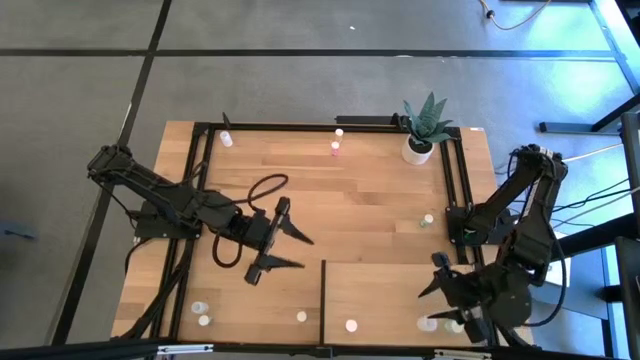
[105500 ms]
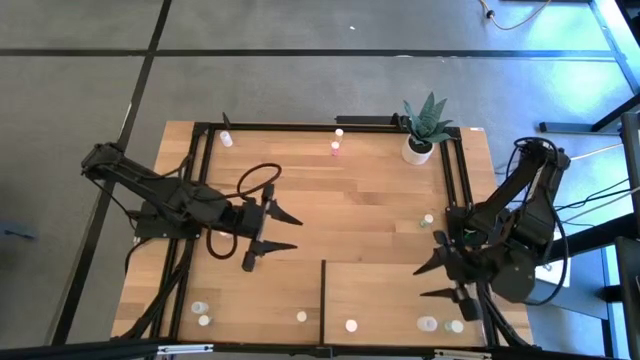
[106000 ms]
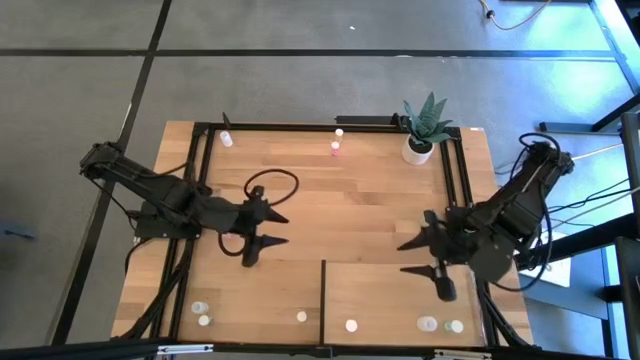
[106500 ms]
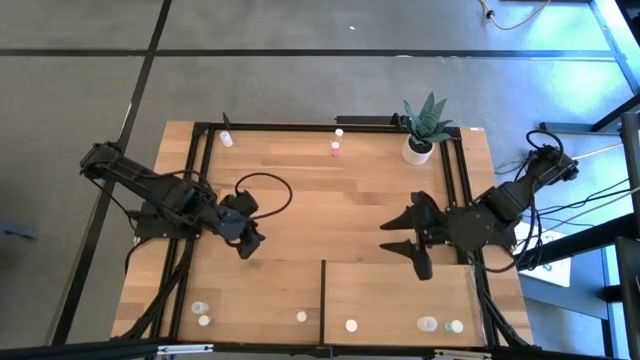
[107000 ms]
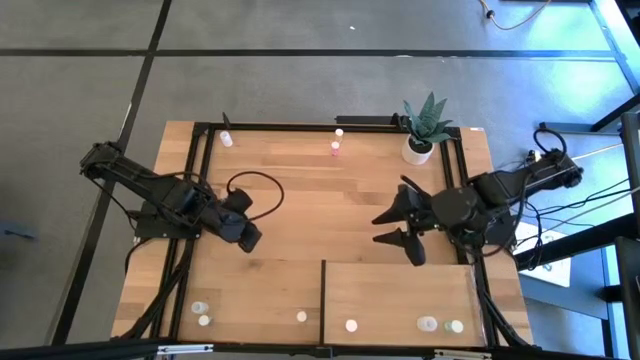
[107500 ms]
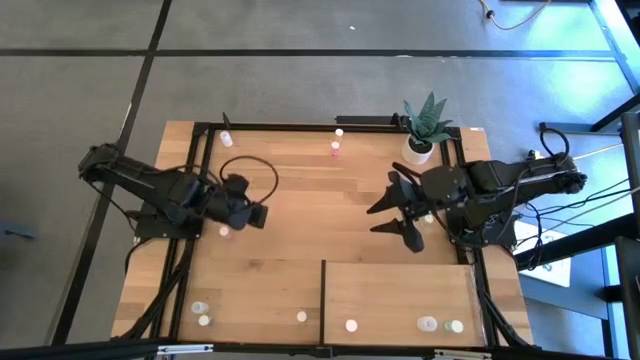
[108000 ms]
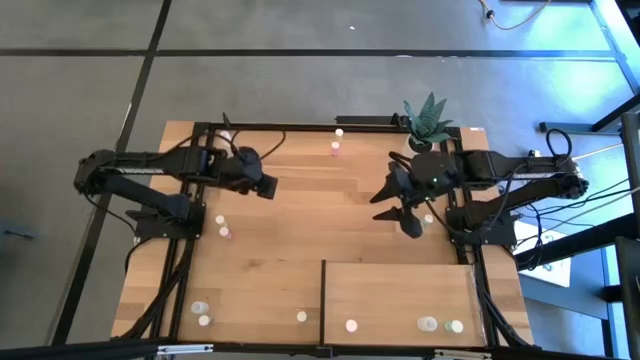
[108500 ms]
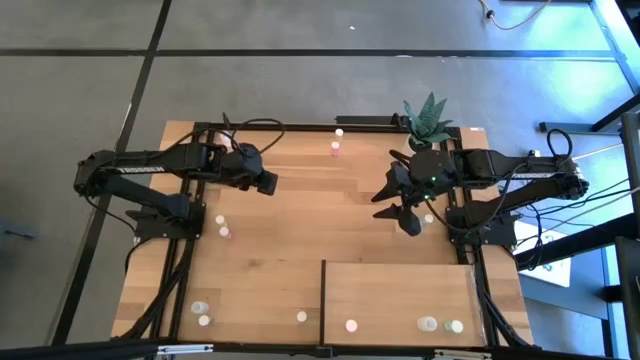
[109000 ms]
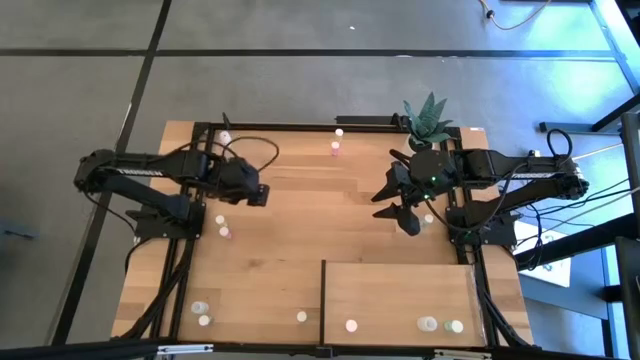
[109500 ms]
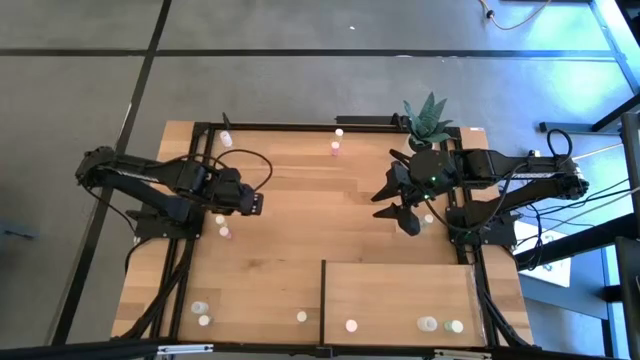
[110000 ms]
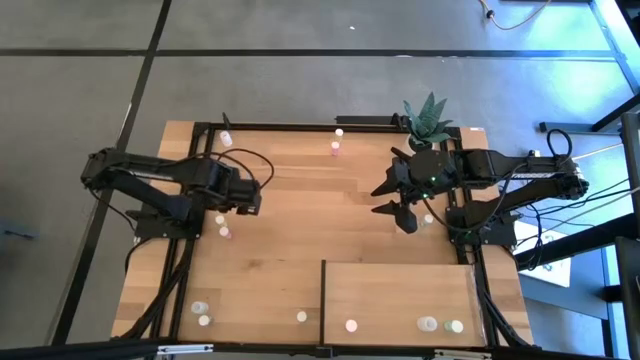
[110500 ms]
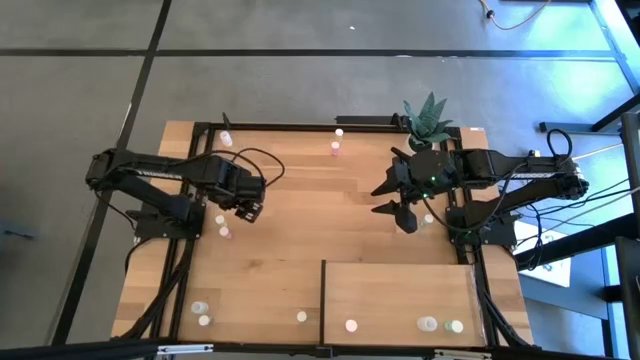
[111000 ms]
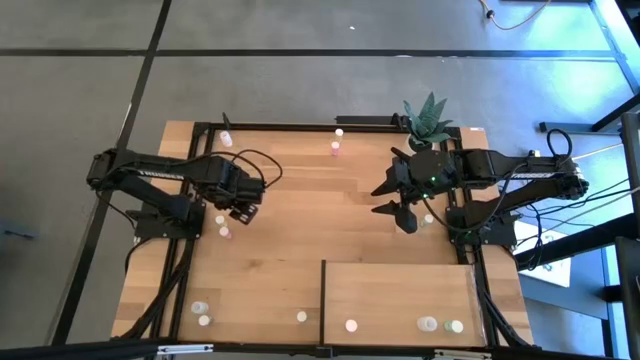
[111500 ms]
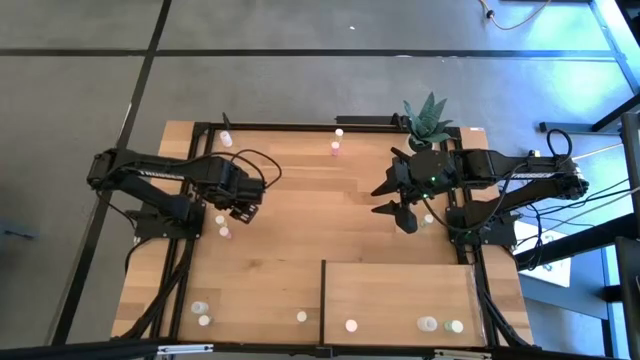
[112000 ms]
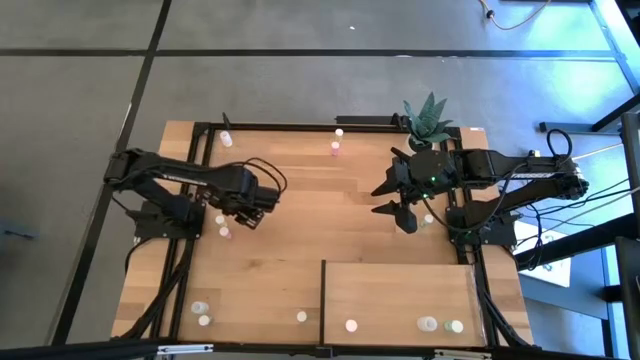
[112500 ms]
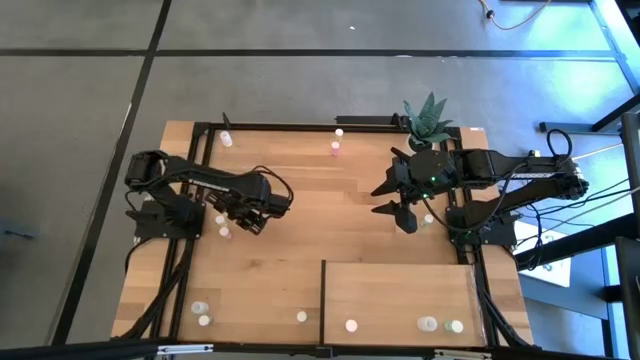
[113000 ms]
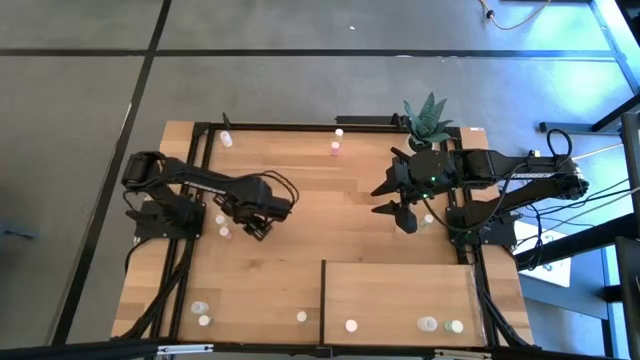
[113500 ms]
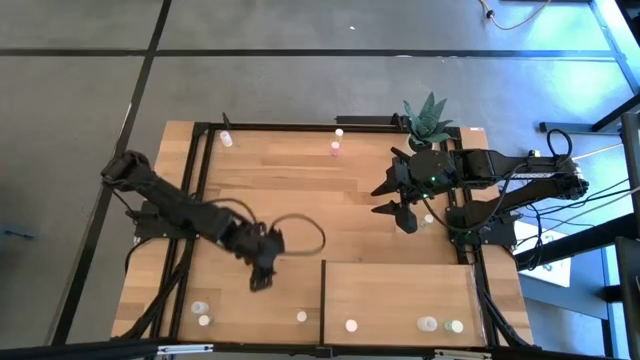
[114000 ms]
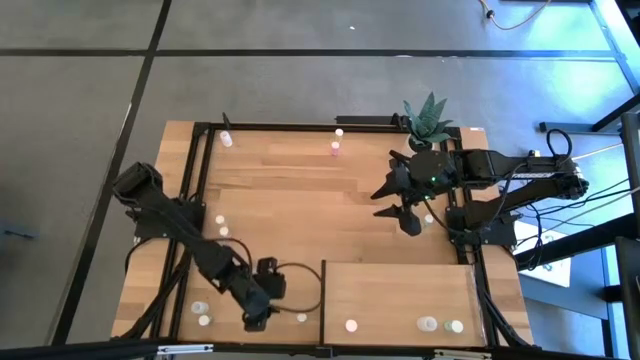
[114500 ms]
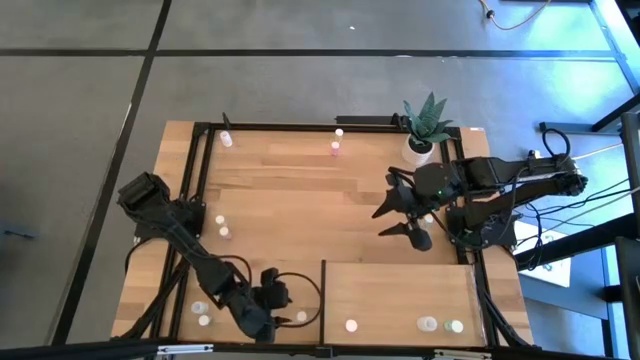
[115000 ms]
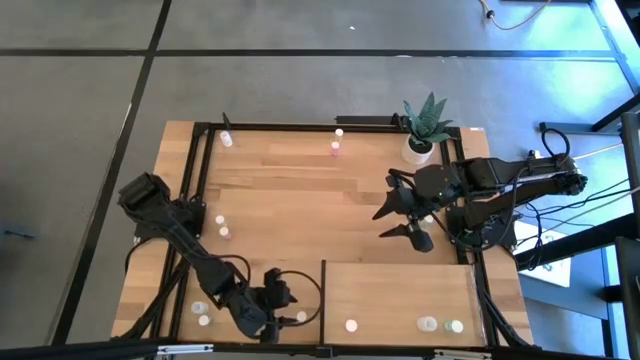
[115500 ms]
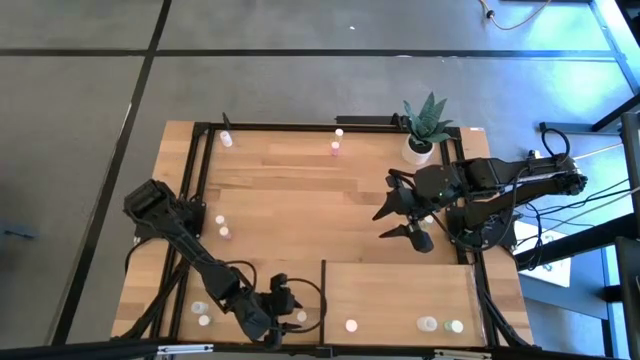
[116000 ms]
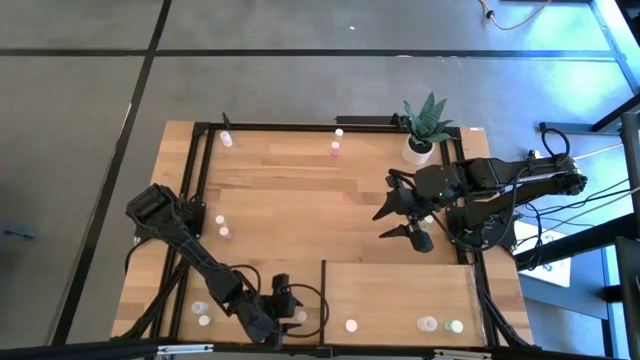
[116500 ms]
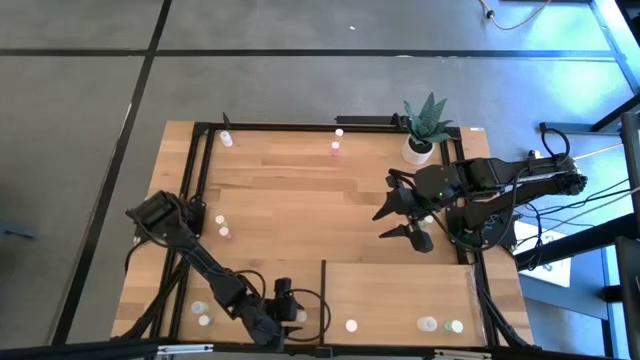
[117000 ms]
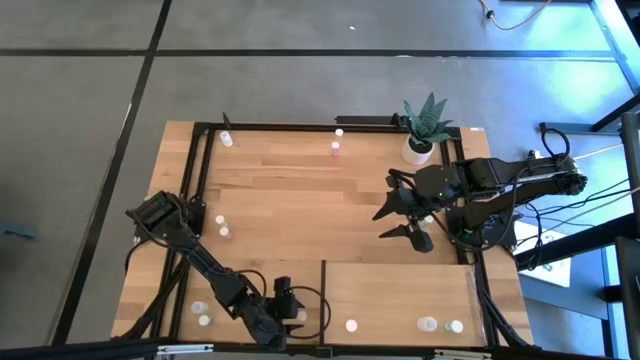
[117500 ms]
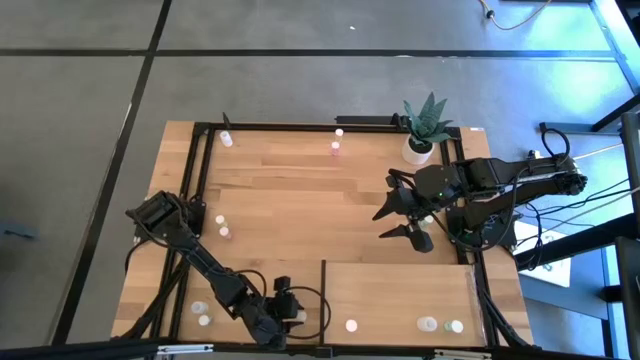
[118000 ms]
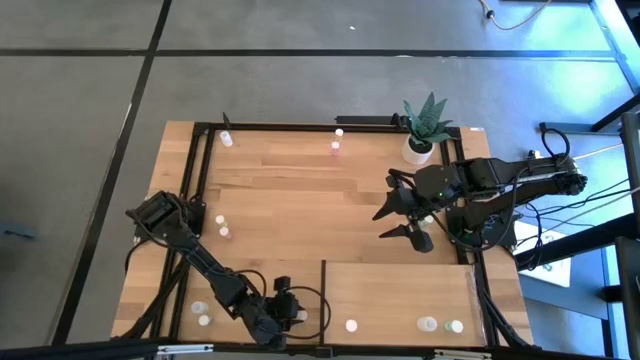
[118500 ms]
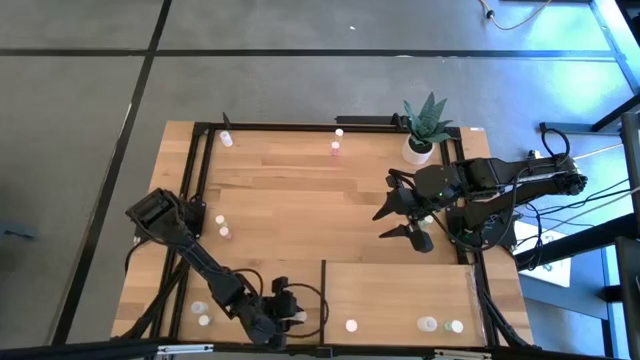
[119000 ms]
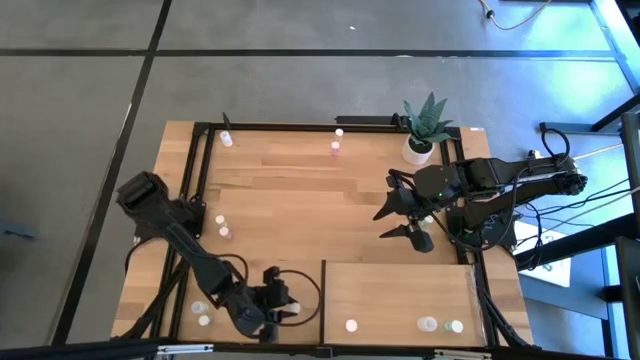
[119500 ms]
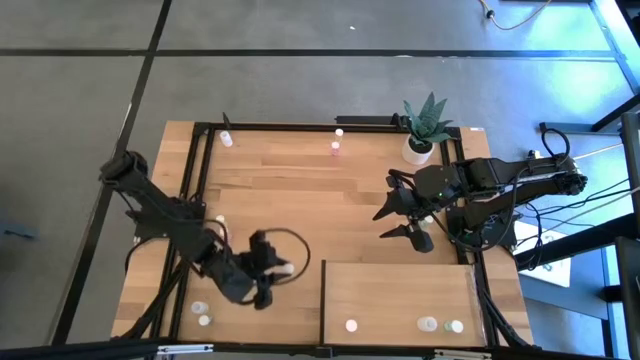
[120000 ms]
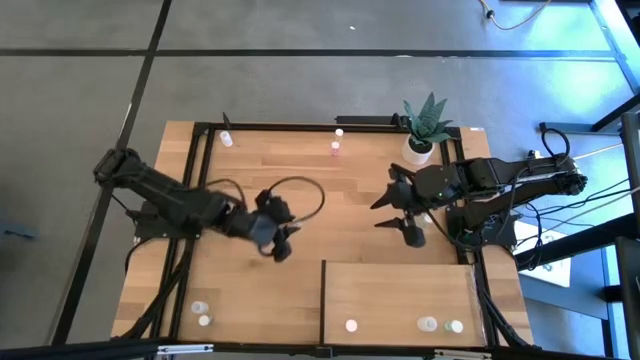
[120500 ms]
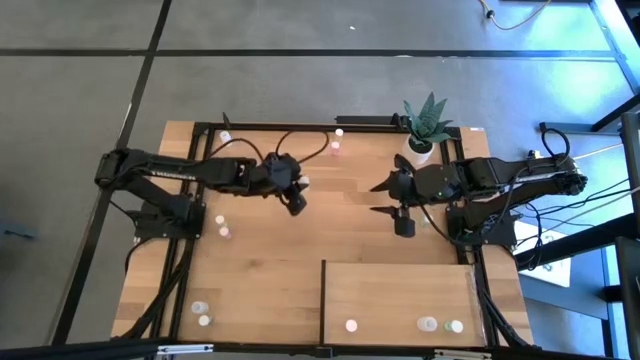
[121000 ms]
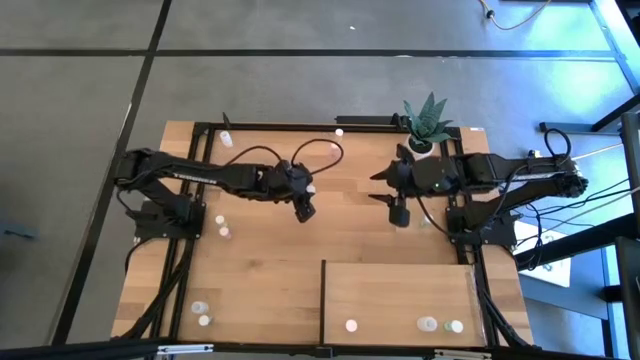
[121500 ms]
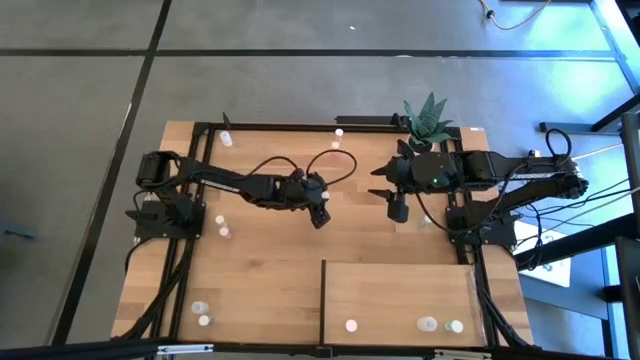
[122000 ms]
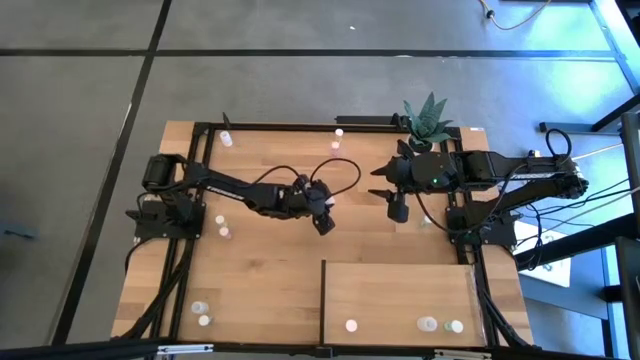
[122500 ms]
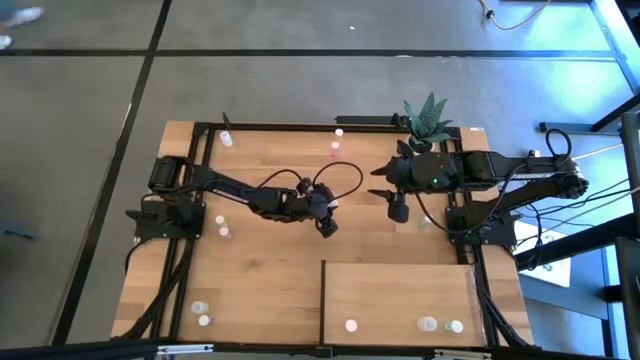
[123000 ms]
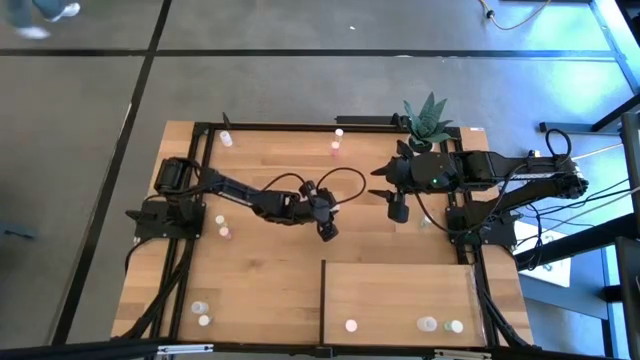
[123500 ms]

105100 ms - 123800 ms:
Task: Pick and place medicine bottles onto shelf by color
Put the bottom yellow pill bottle on the shelf

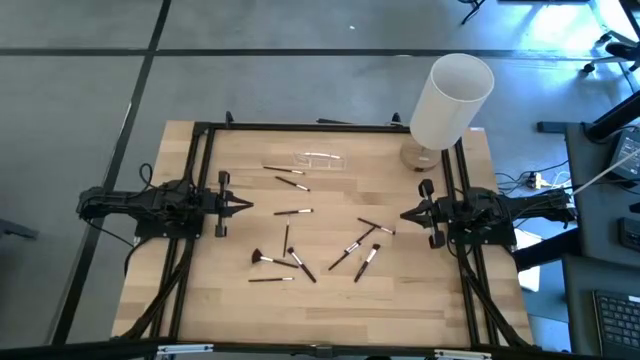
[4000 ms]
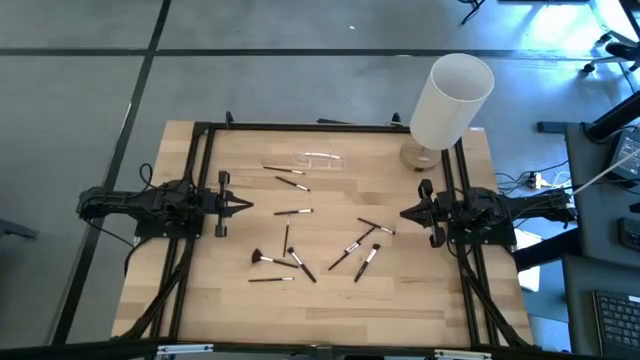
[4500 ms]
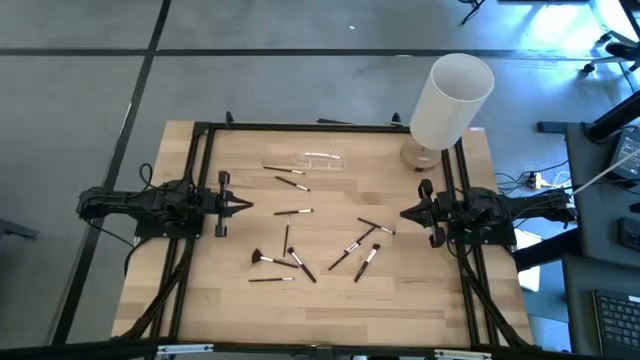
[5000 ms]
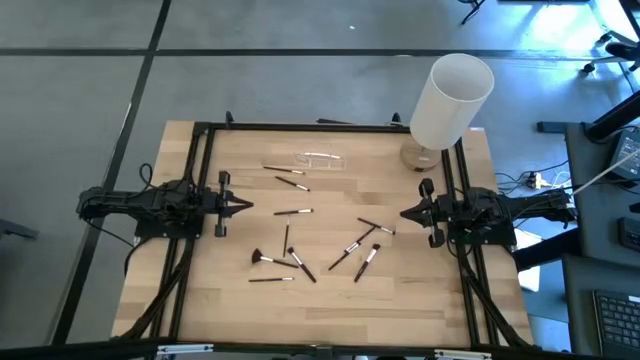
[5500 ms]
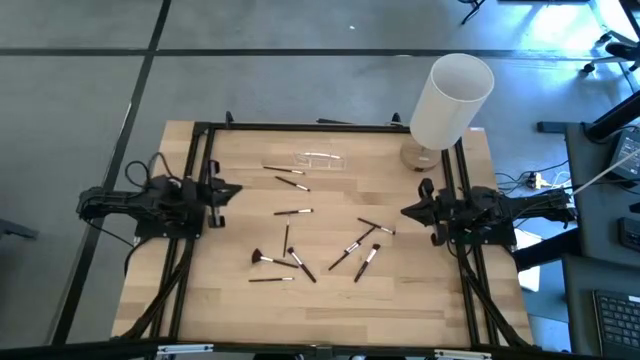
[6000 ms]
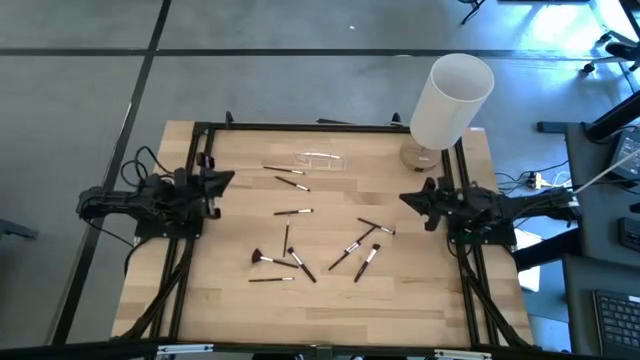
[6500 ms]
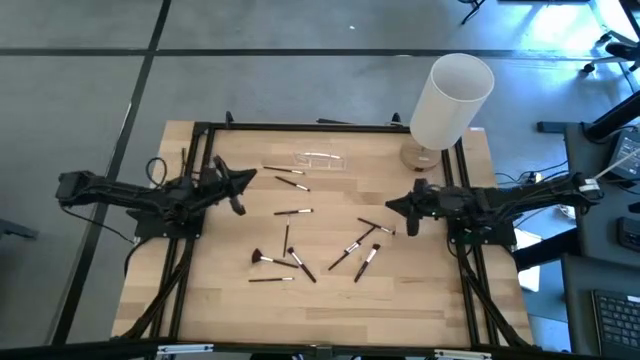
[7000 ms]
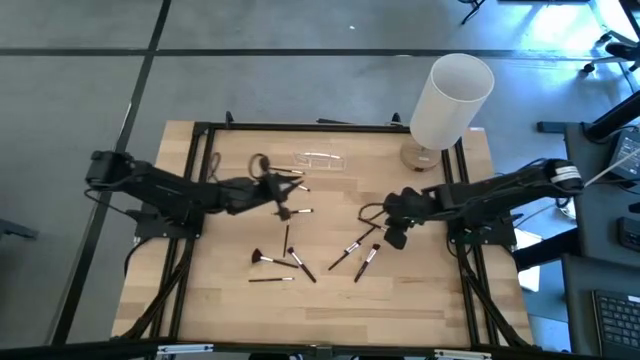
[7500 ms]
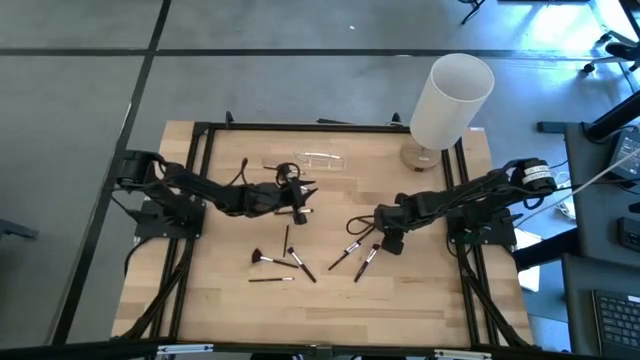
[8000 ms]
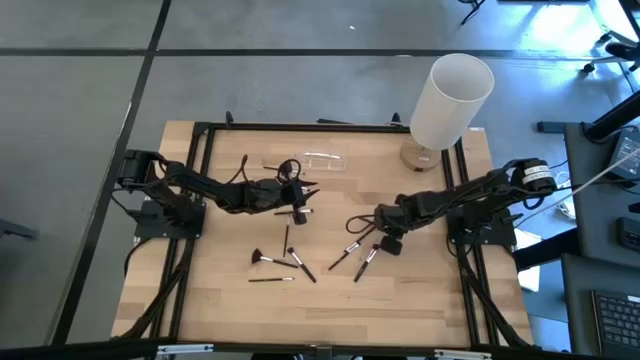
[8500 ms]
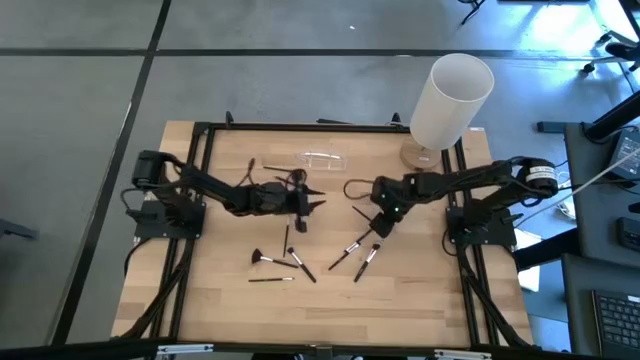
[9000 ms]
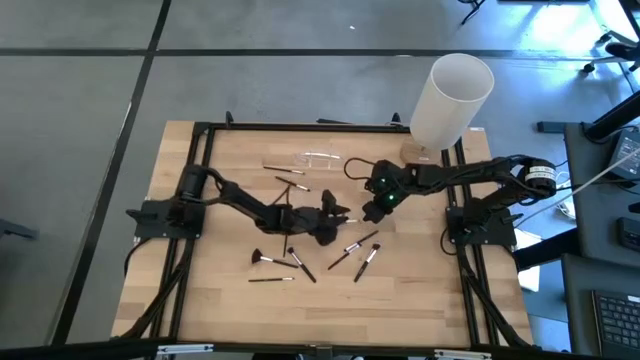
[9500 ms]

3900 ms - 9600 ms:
Task: Pick & Place Makeup Brushes
Put the eyeshadow brush into the transparent organizer
